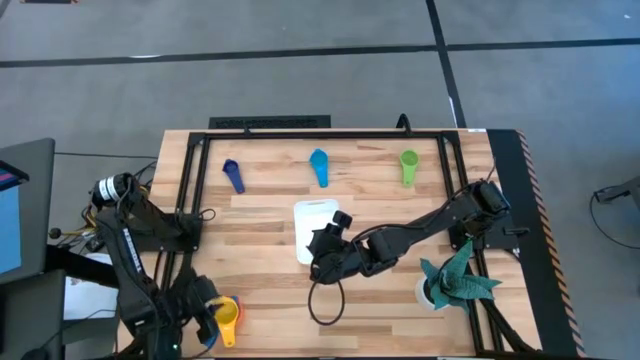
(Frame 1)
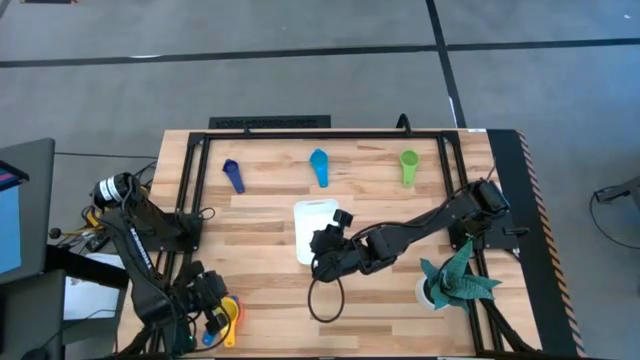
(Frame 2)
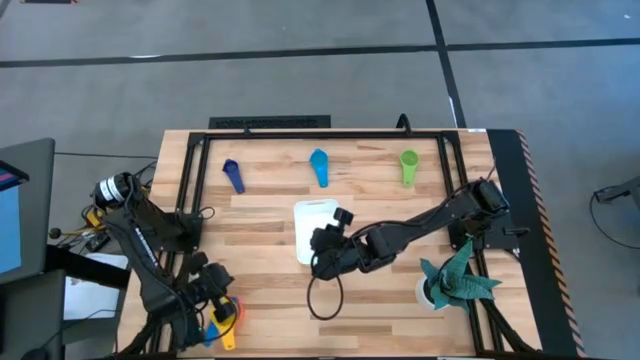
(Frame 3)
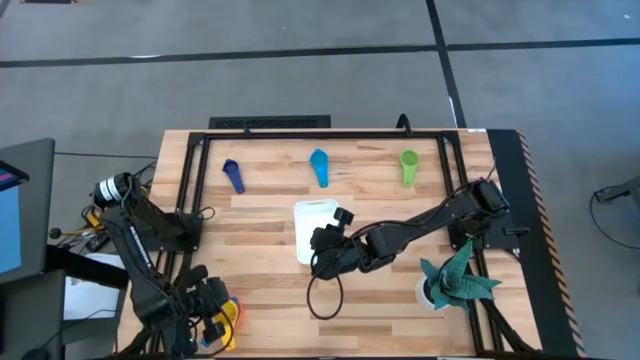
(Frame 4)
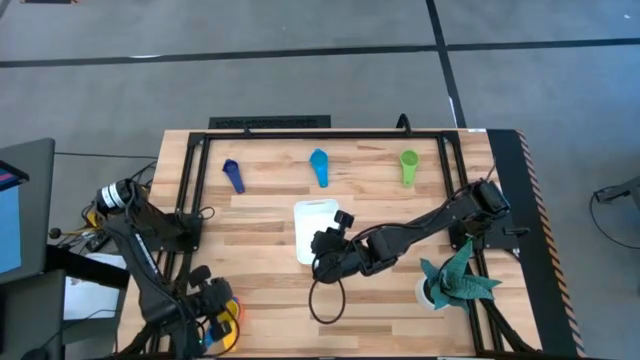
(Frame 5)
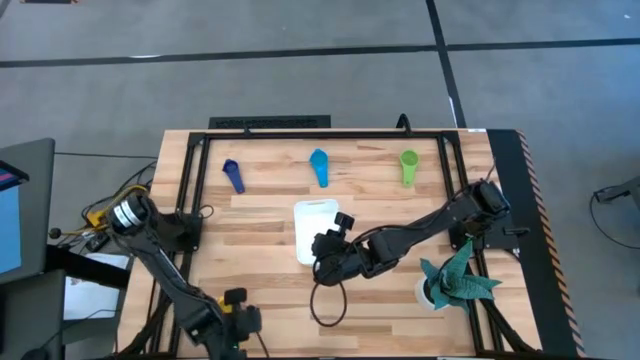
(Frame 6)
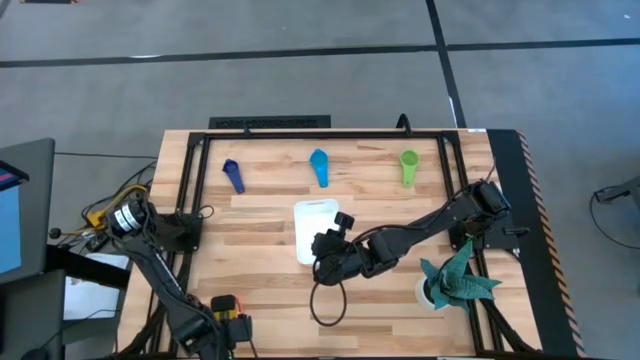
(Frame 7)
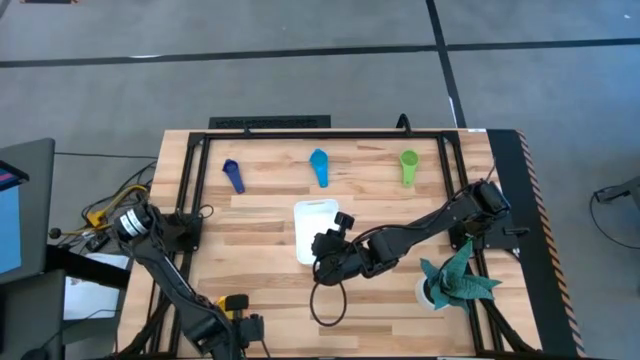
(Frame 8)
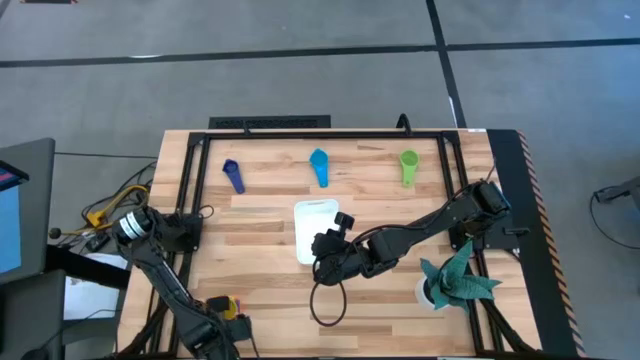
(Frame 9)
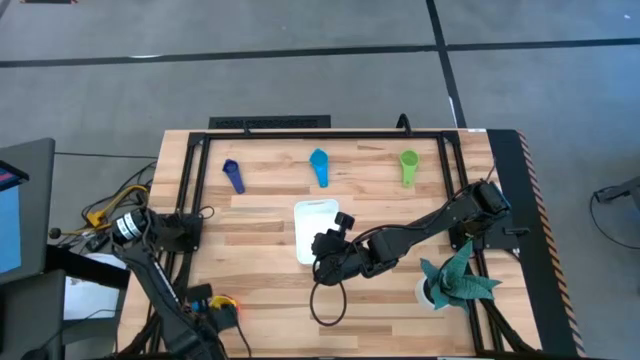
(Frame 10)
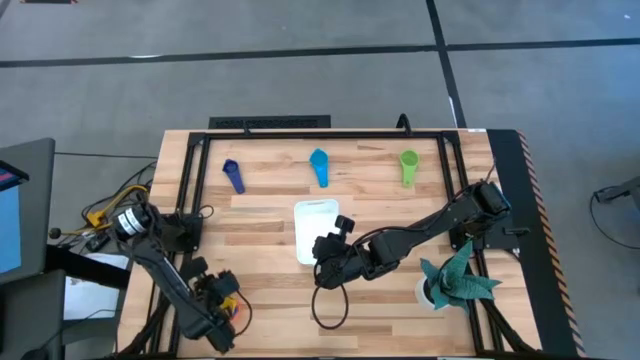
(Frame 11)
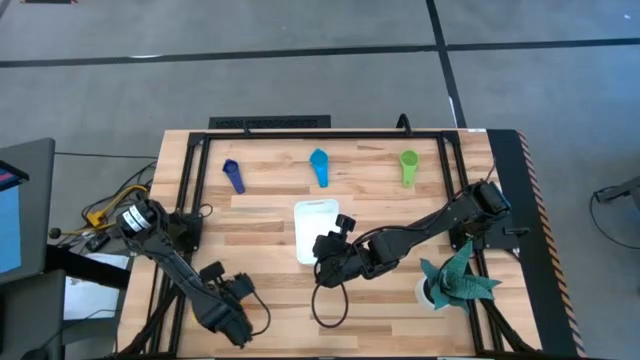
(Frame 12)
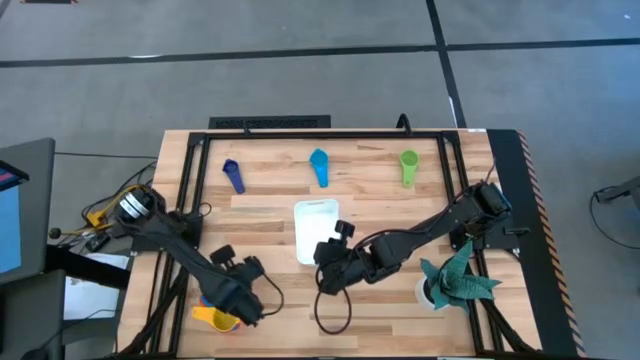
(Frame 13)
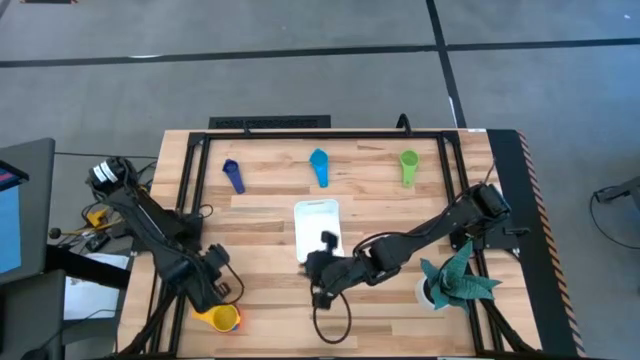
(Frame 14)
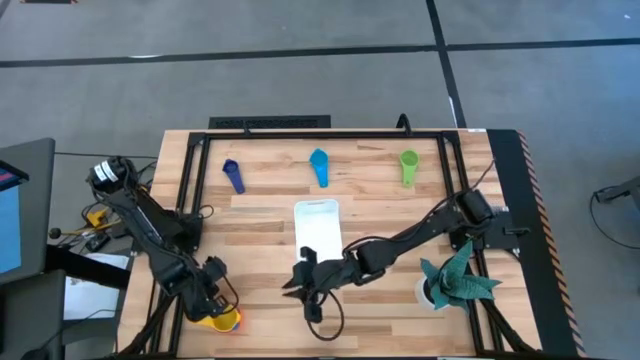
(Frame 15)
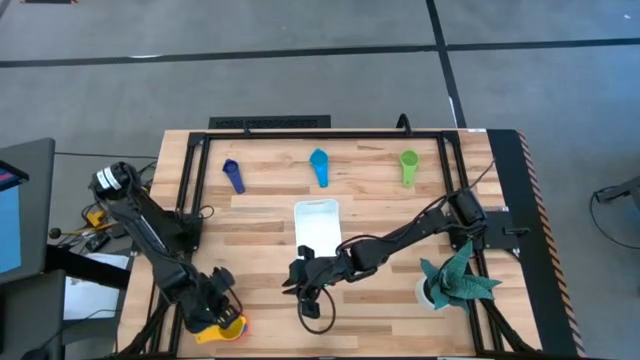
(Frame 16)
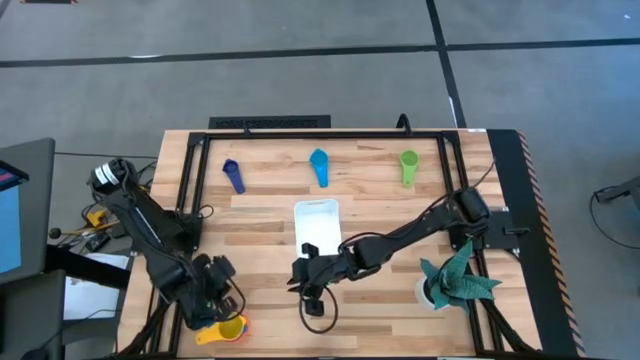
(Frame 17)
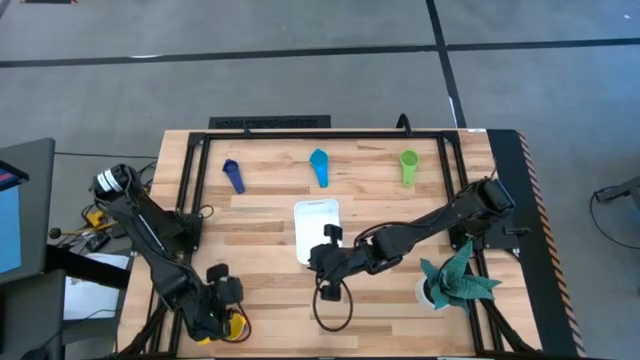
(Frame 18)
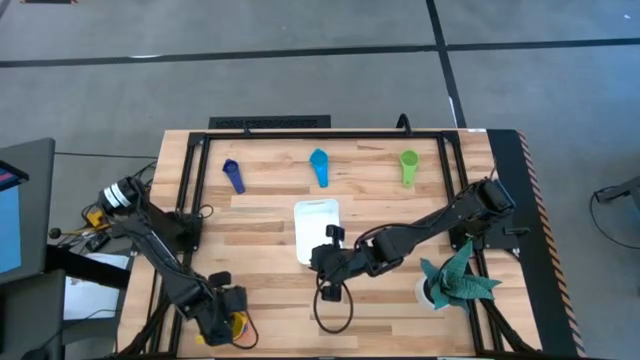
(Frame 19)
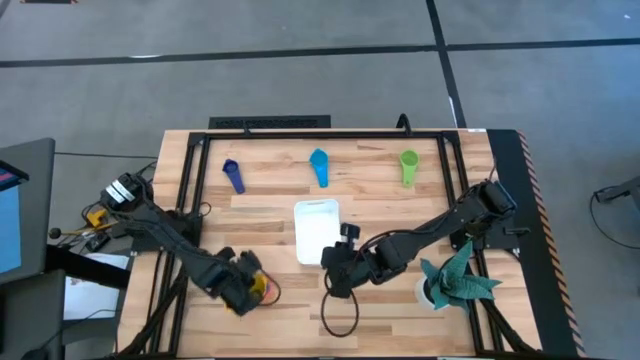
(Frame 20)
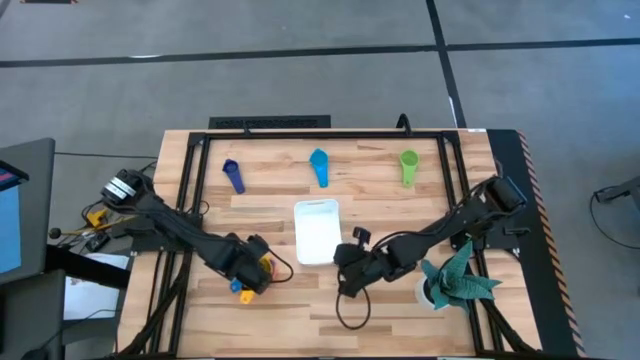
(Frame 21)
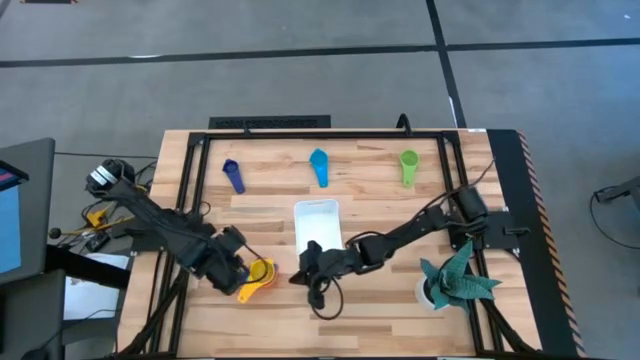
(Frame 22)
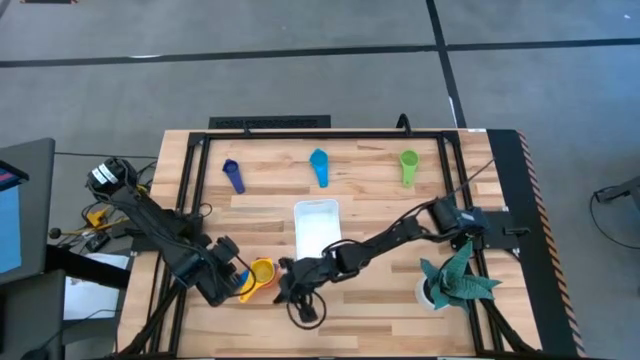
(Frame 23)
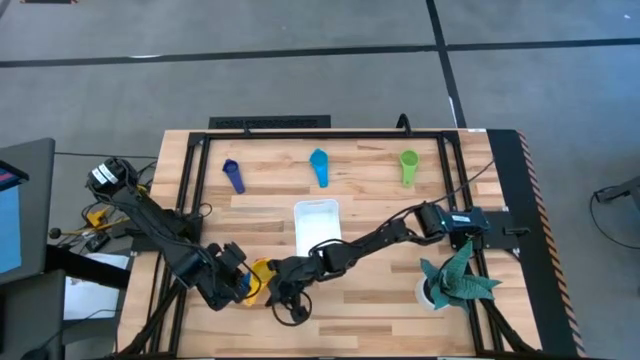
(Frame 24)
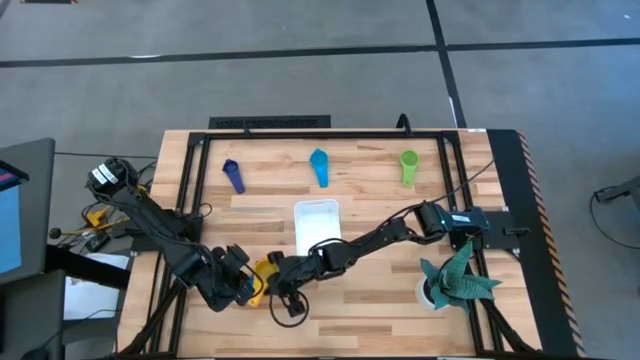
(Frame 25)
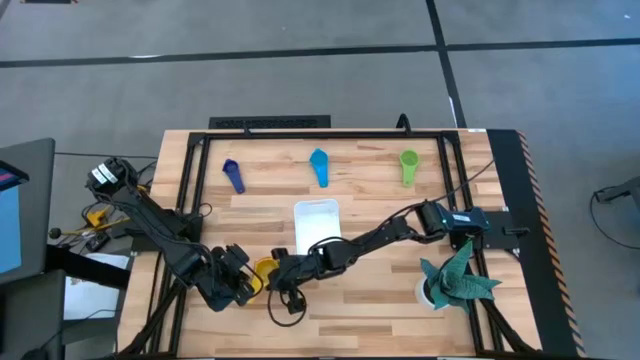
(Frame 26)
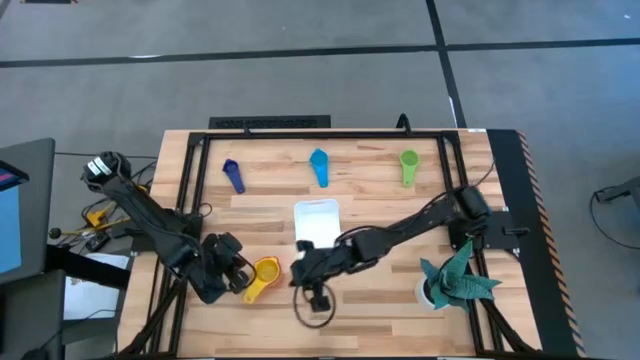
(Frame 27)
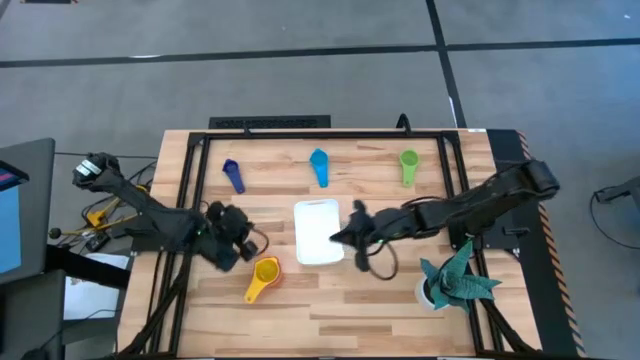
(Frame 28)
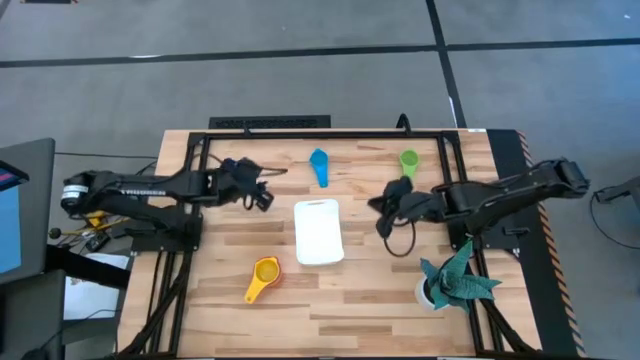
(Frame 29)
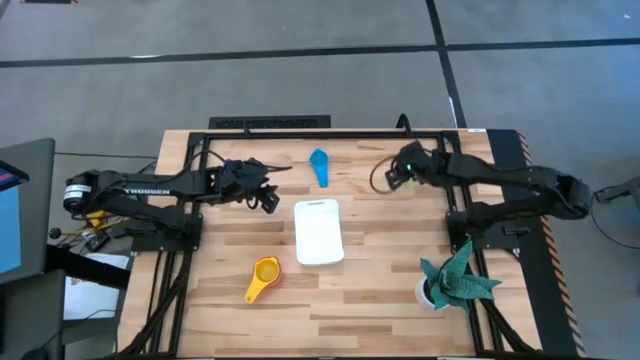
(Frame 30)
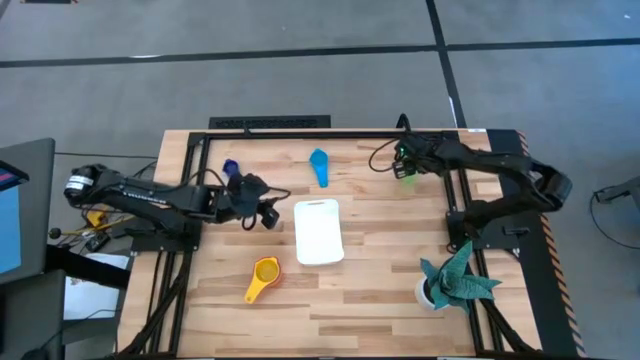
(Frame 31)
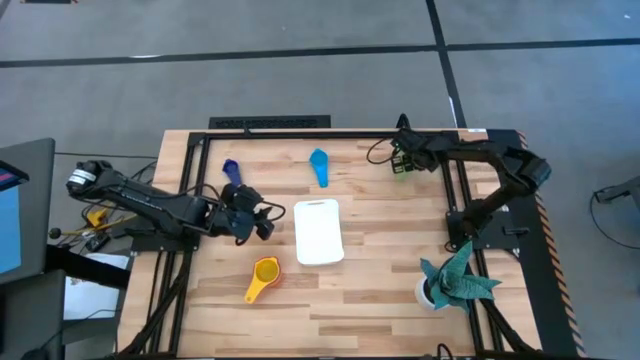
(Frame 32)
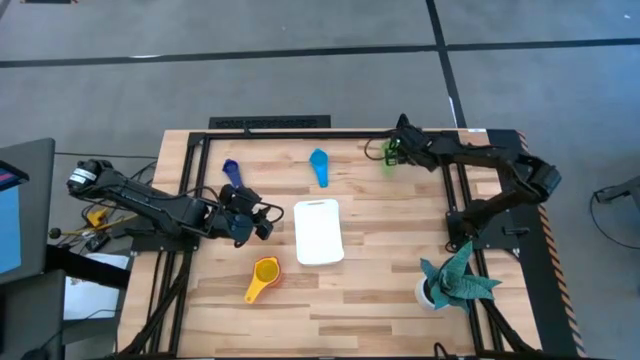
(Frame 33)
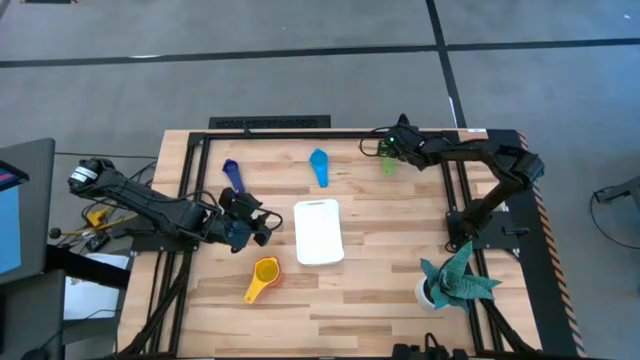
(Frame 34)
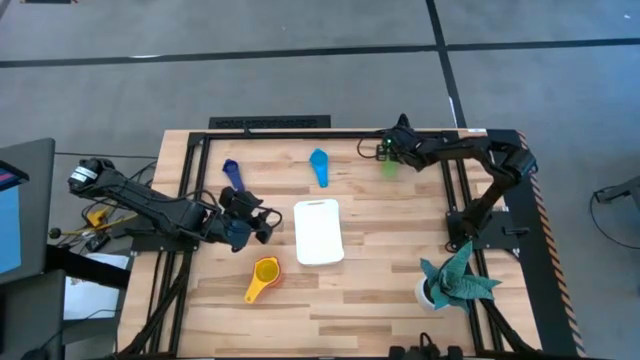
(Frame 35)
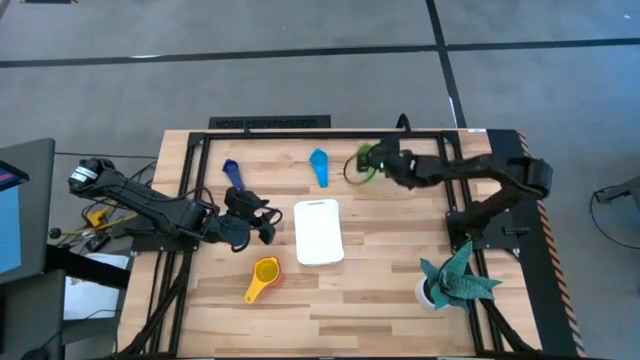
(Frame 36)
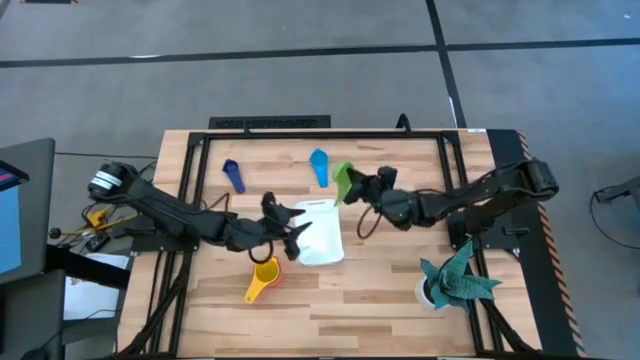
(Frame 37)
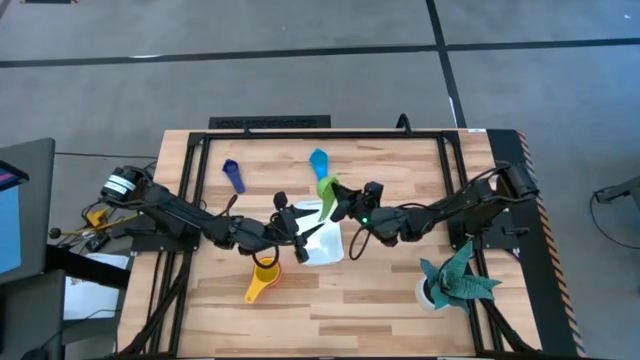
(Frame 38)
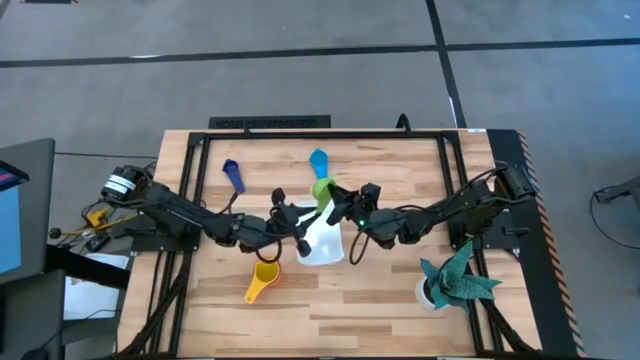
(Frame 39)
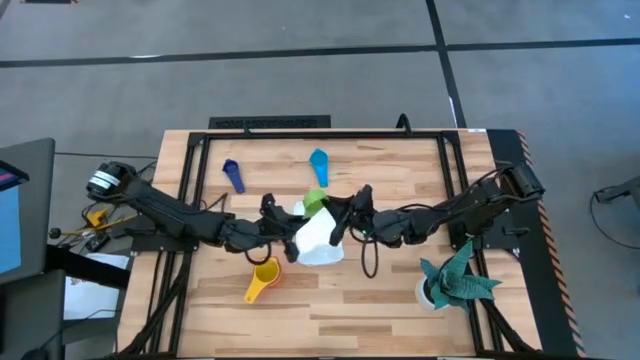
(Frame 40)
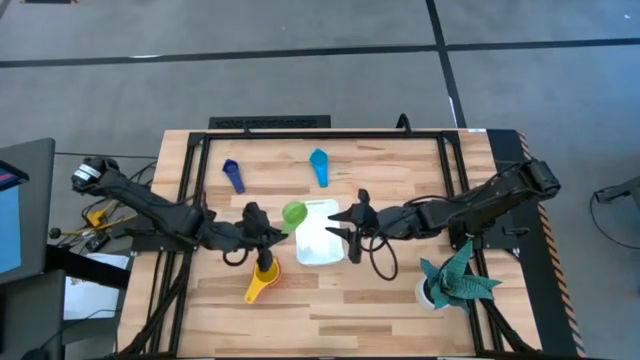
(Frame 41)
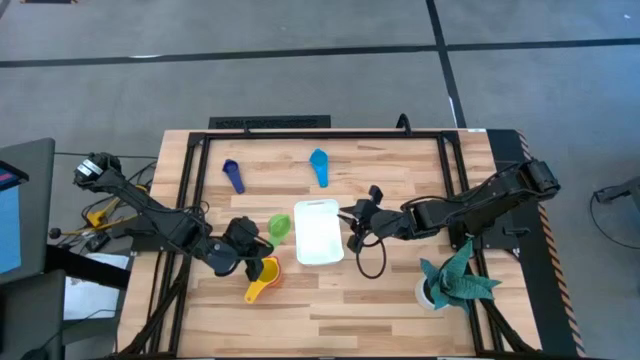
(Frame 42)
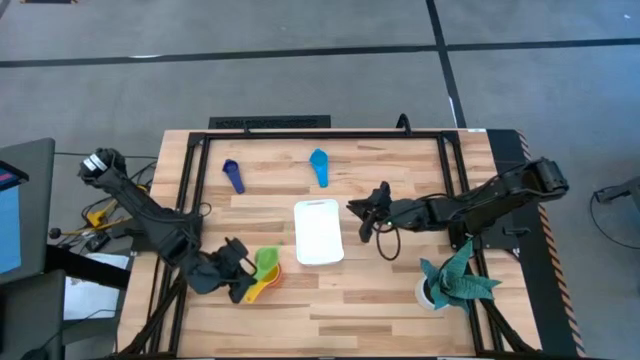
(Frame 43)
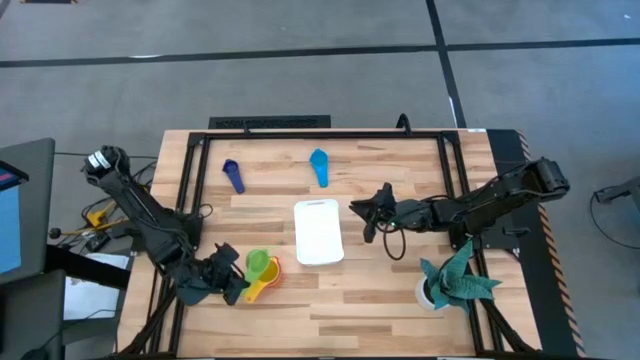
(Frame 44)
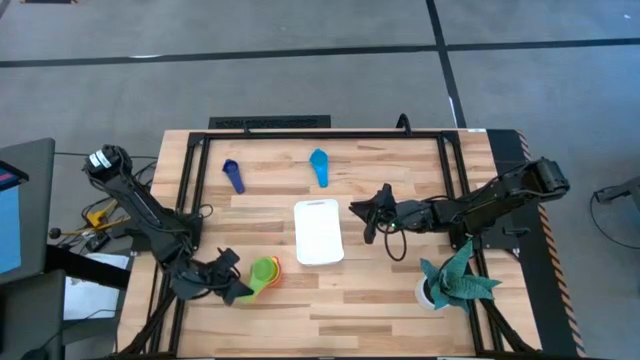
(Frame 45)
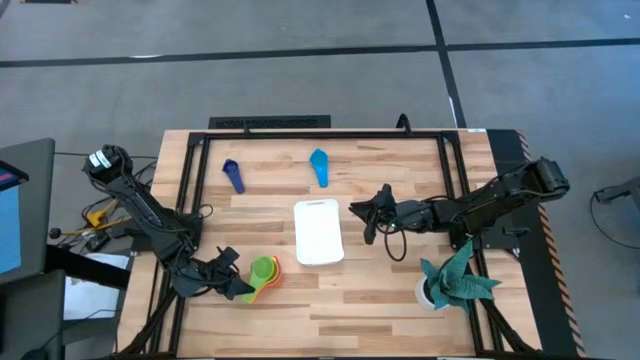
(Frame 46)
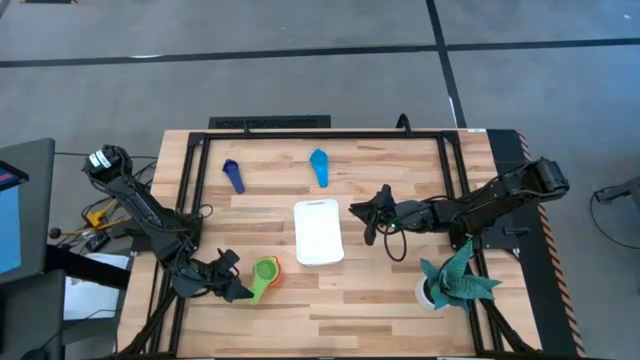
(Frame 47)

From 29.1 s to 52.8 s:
Task: Nest measuring cups in basket
Stack the green nest measuring cup into the yellow nest measuring cup
